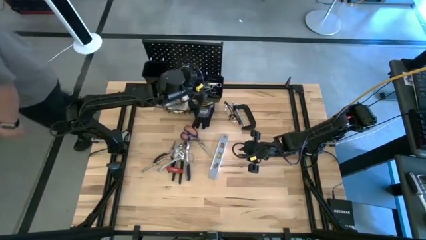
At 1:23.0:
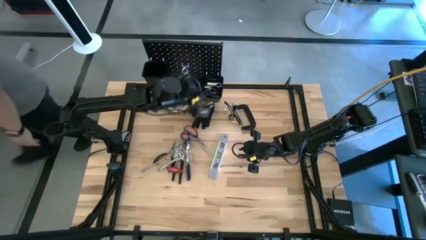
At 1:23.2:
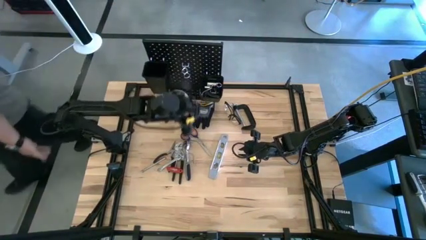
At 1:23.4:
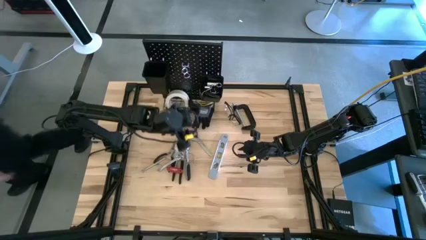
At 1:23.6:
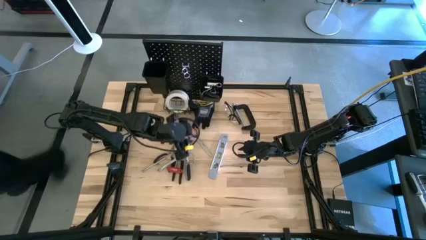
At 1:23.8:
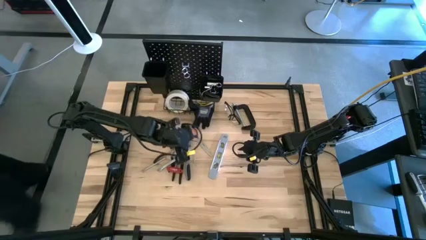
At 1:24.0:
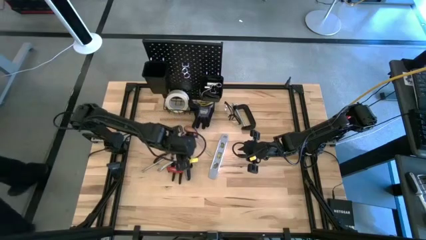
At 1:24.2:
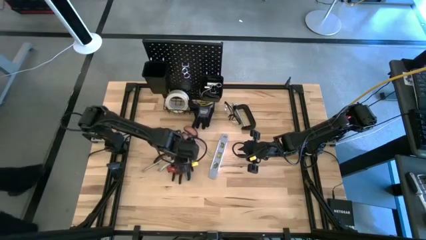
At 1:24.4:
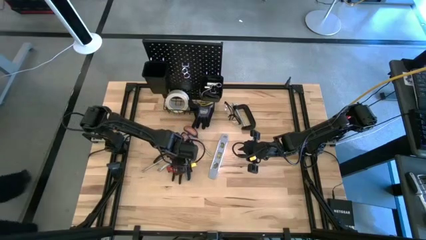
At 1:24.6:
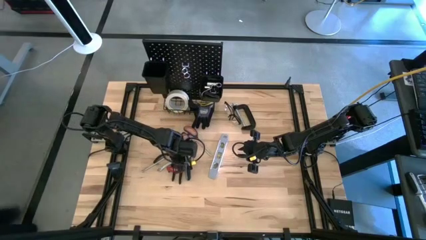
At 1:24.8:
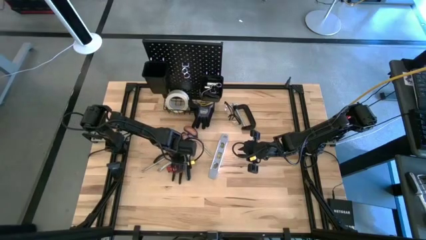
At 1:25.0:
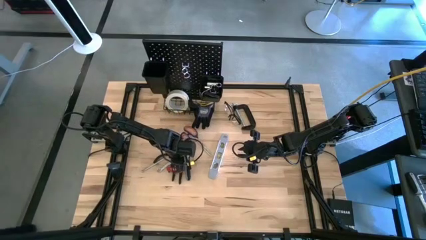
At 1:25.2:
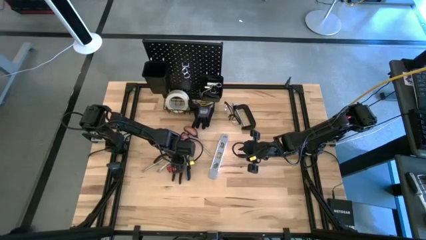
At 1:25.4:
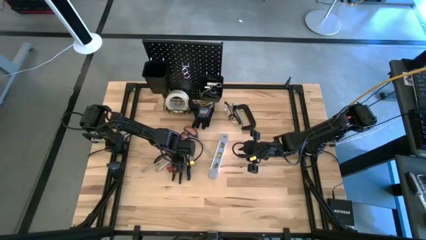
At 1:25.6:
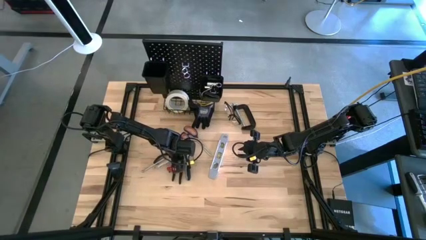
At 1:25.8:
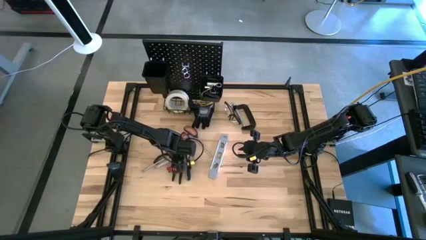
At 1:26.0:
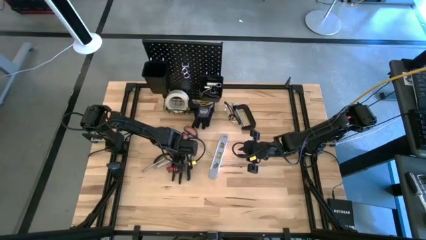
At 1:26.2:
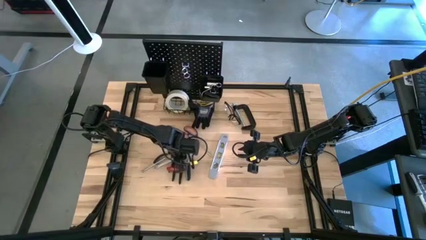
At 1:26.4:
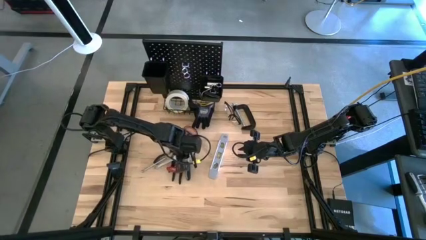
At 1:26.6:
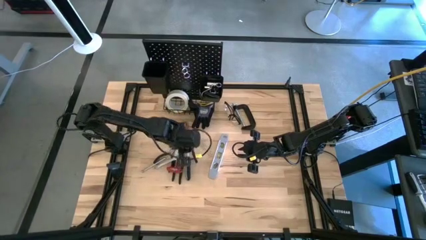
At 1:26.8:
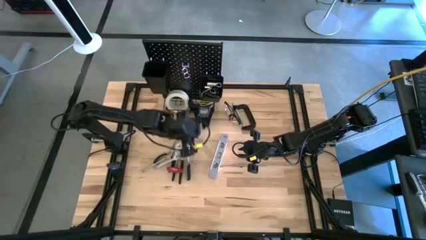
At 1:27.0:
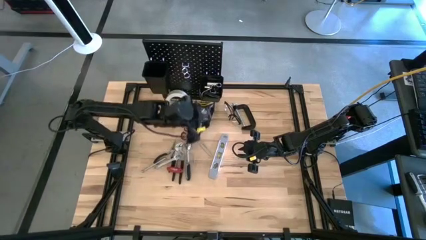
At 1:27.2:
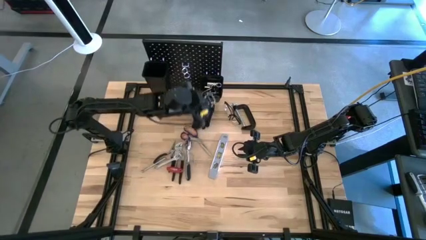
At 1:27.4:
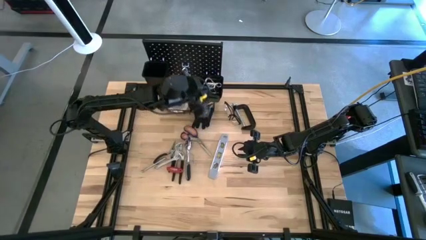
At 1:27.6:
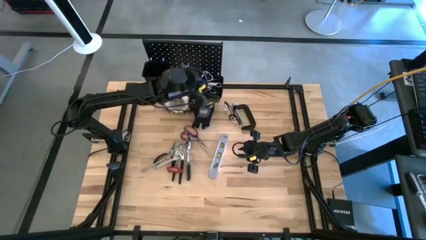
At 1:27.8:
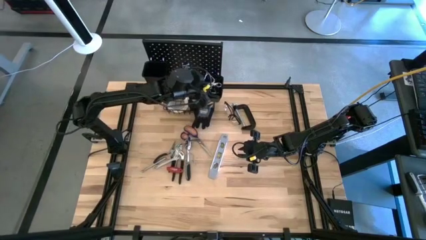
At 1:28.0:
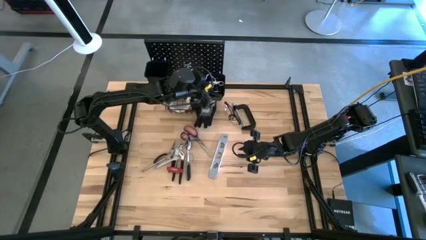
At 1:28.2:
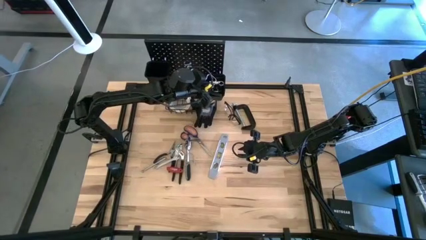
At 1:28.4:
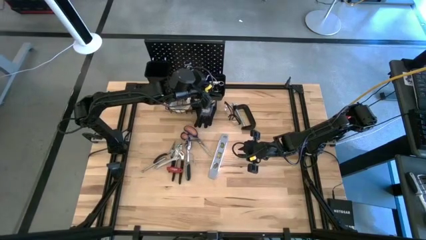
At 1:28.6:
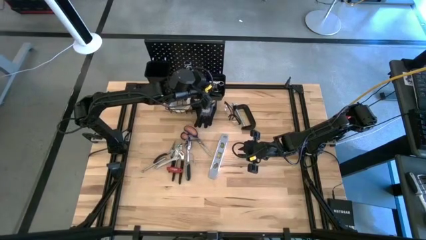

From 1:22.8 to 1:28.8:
Task: Hang tools onto peg board
Put the binder clip into the right black bin on the pegboard

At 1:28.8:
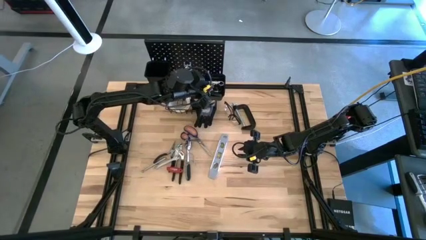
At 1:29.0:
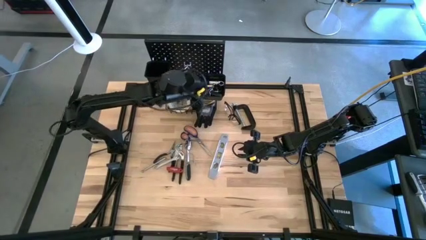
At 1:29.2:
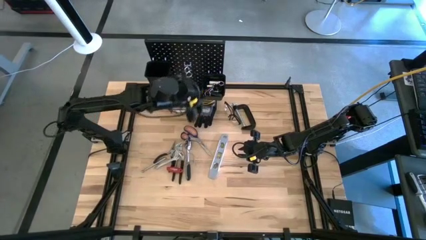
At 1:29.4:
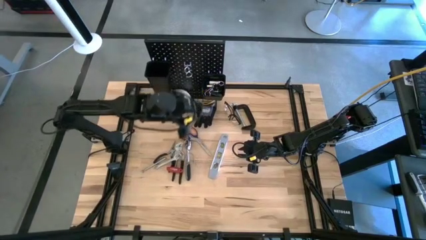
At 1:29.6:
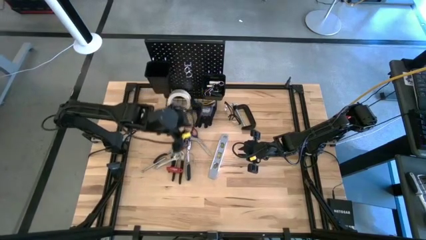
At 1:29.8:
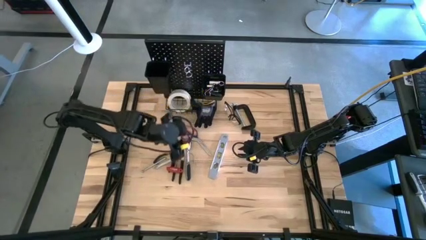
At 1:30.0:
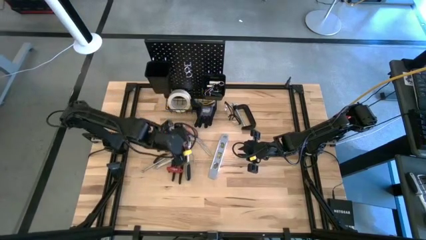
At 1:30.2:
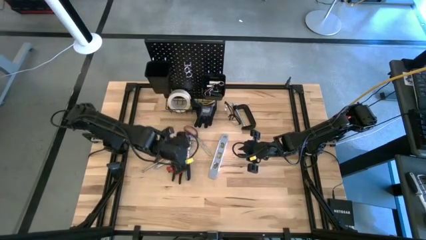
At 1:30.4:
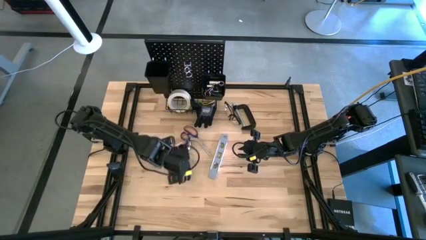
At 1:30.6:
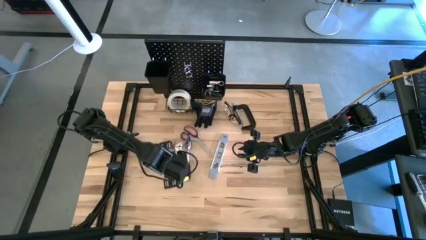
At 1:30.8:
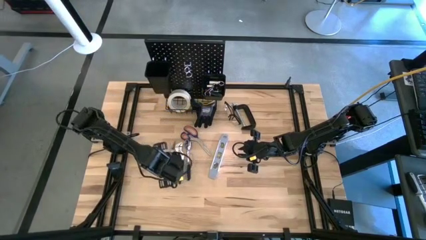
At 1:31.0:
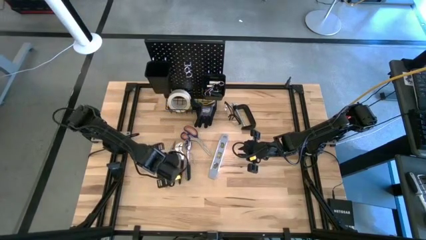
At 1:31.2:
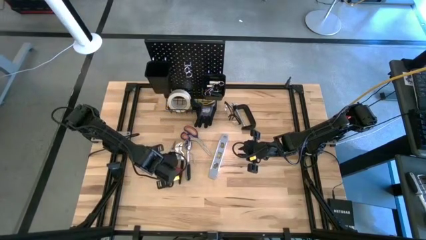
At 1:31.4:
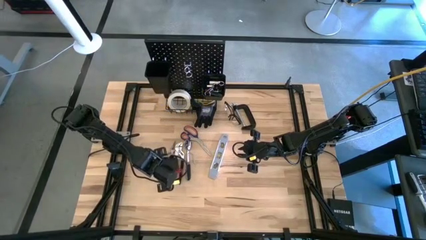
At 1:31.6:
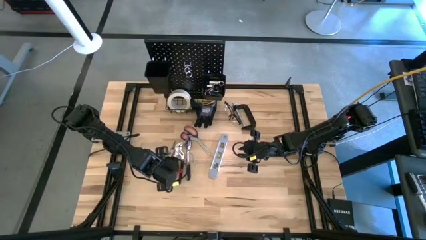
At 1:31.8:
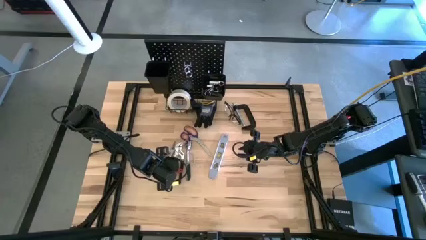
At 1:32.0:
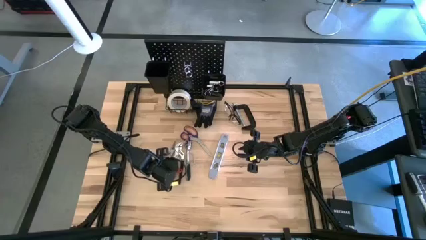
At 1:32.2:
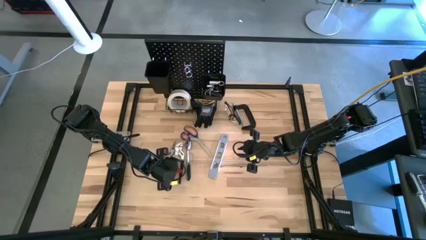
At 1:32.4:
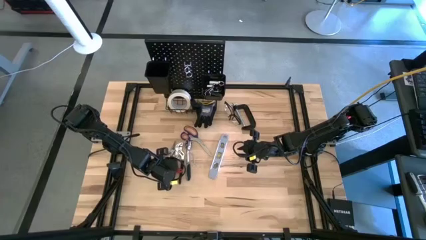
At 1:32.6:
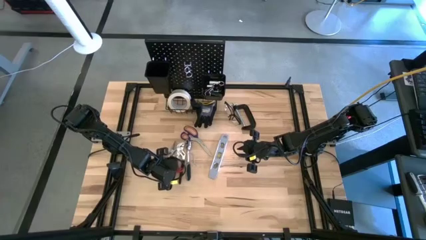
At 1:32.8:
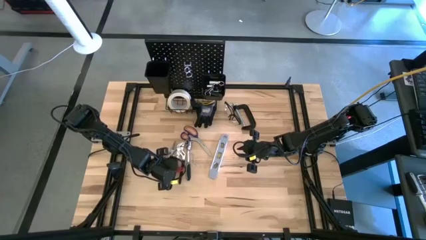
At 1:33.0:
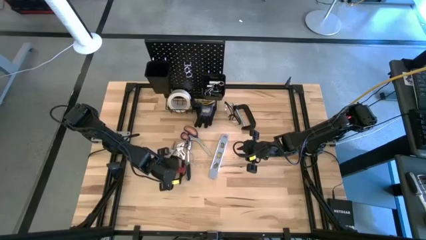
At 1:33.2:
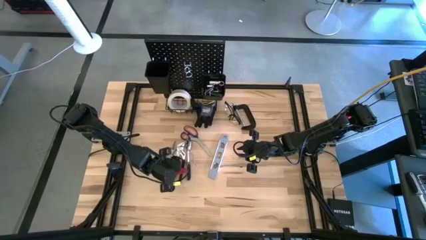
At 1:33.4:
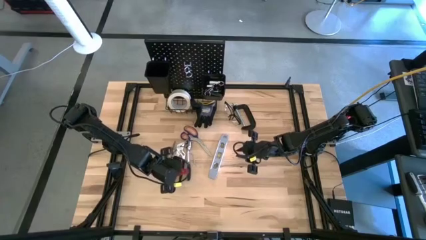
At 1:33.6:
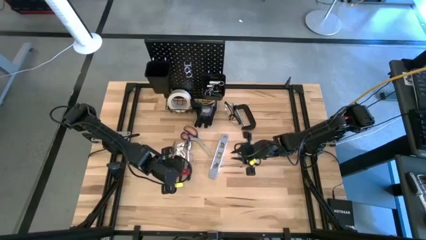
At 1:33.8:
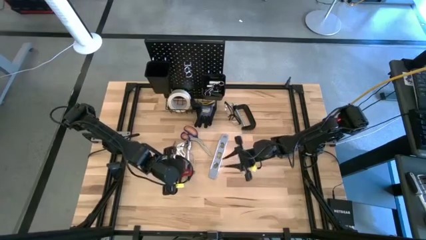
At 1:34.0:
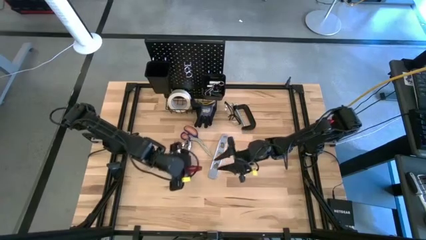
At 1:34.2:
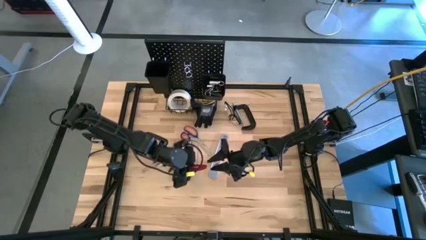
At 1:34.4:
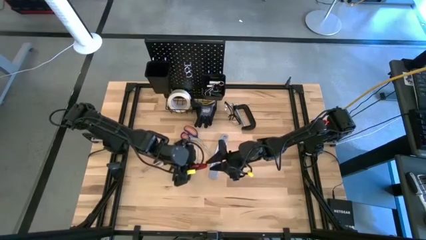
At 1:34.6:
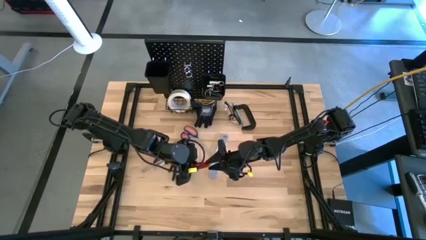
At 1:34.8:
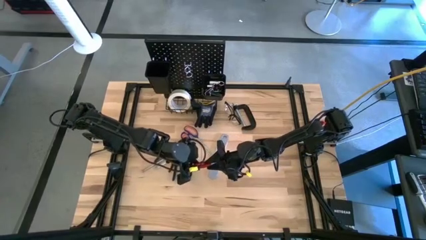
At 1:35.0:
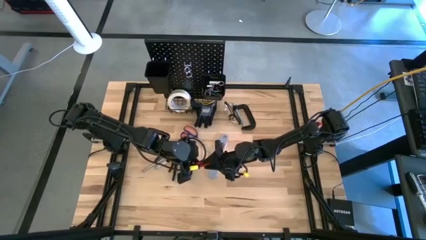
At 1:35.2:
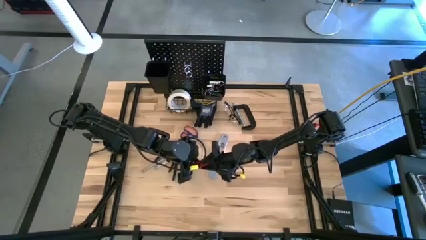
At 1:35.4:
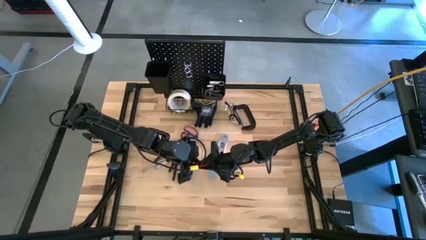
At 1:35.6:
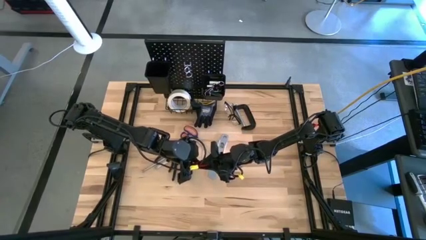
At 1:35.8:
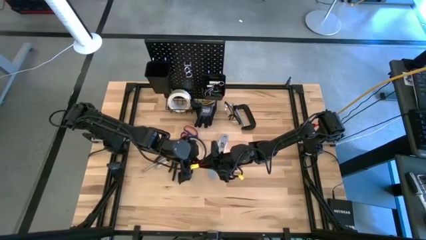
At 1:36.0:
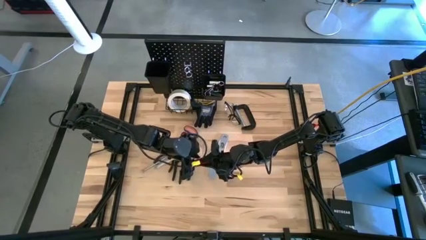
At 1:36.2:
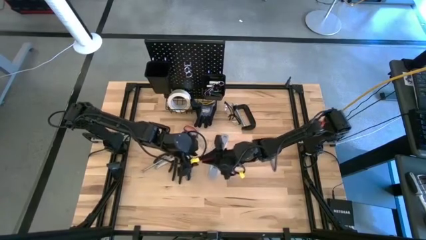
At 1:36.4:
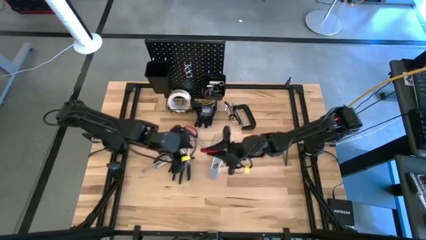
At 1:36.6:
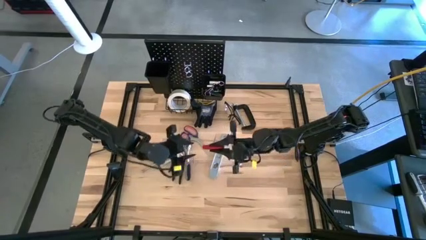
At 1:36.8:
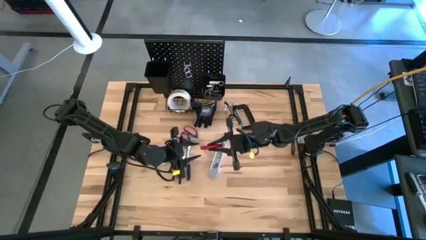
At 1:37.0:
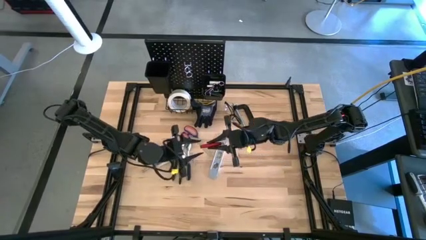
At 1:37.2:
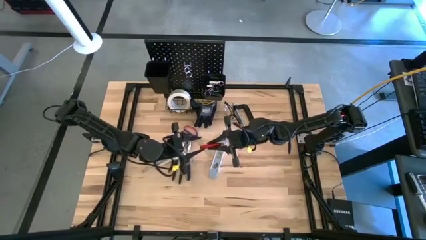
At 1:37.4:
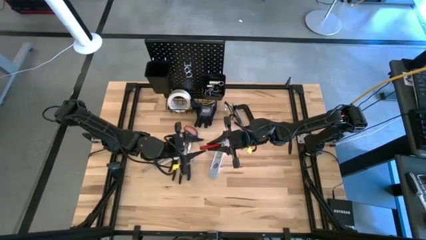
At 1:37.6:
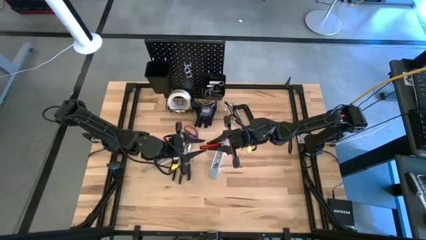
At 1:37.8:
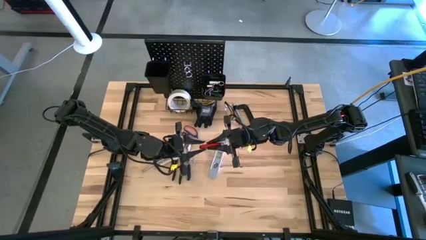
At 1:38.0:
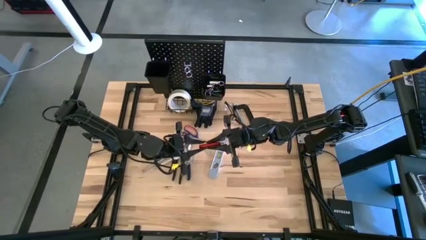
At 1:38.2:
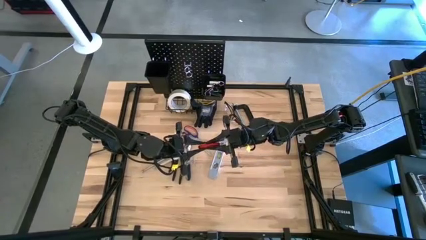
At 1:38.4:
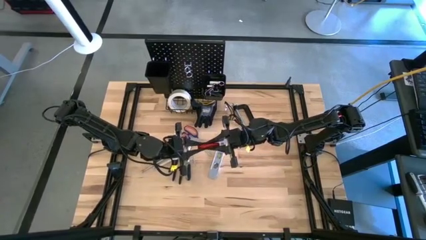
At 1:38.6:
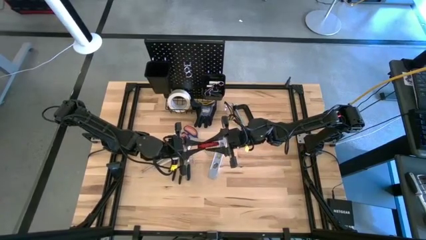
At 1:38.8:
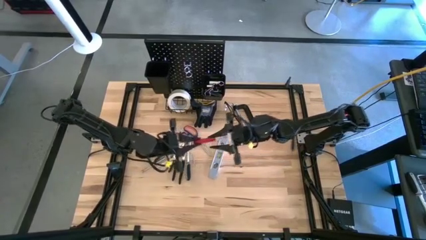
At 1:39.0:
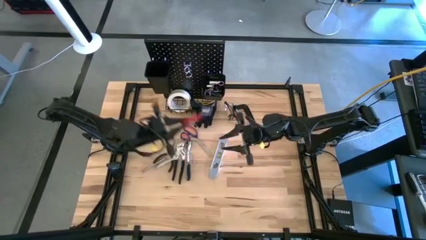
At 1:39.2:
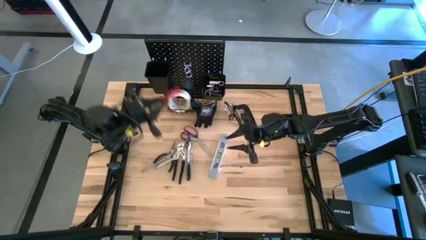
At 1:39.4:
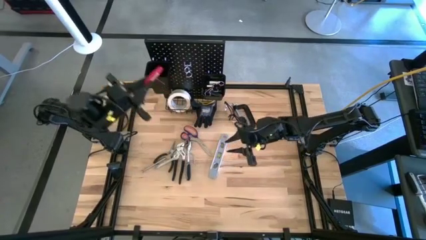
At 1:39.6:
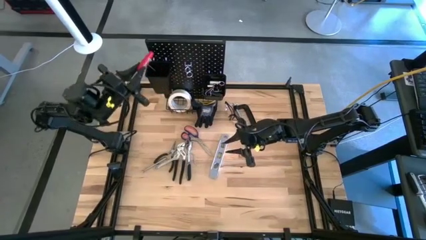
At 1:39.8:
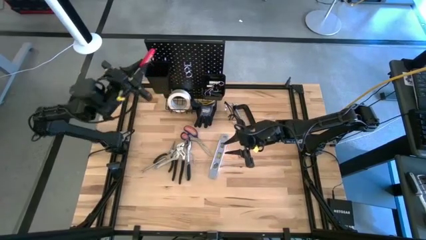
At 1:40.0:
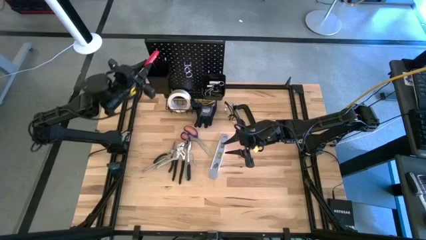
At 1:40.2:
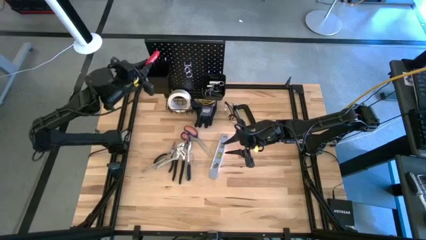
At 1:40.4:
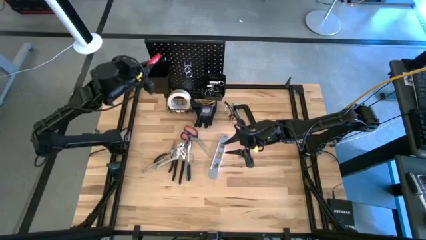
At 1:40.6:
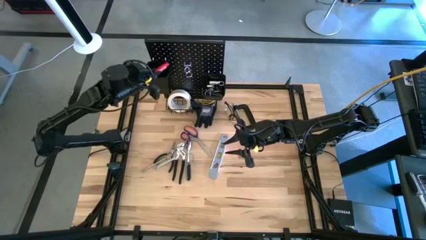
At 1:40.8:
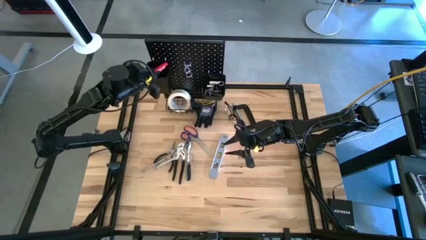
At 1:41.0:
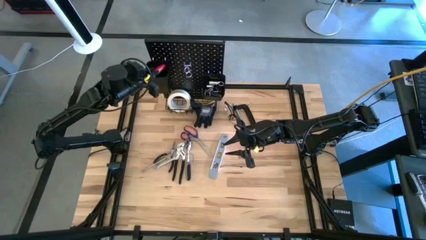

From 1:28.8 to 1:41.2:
Put the Allen wrench on the left black bin on the pegboard
